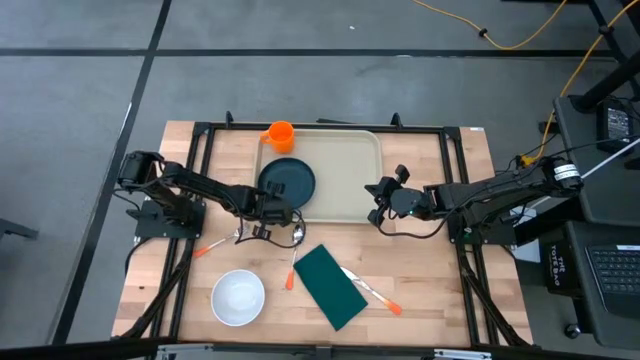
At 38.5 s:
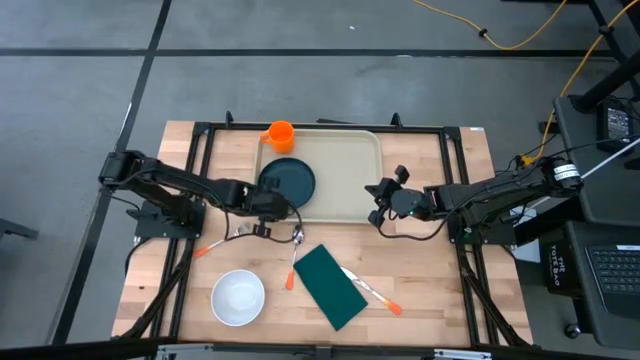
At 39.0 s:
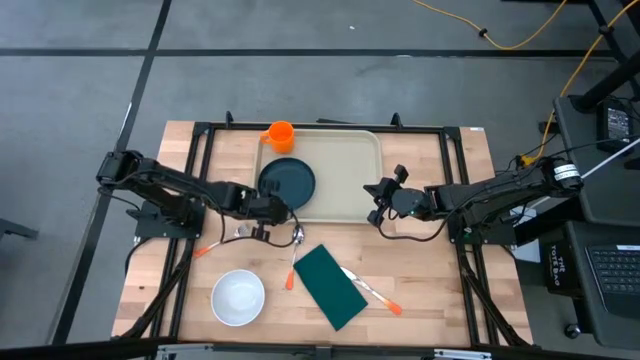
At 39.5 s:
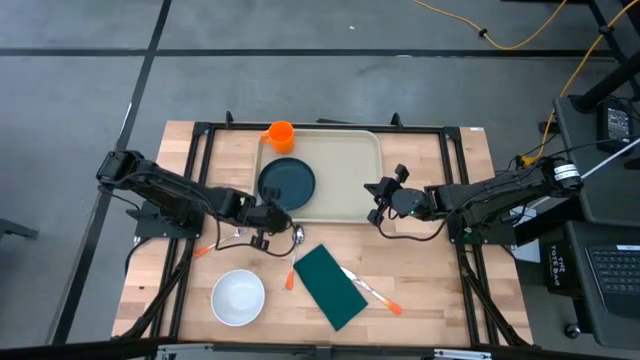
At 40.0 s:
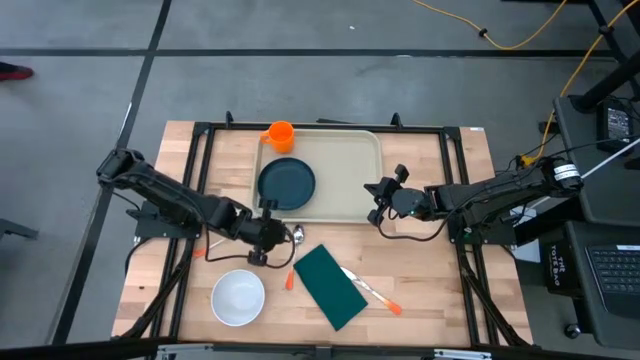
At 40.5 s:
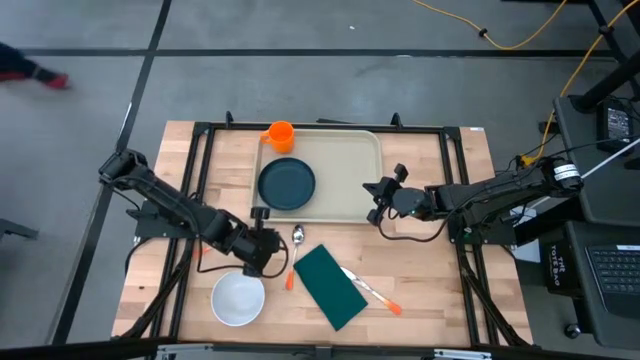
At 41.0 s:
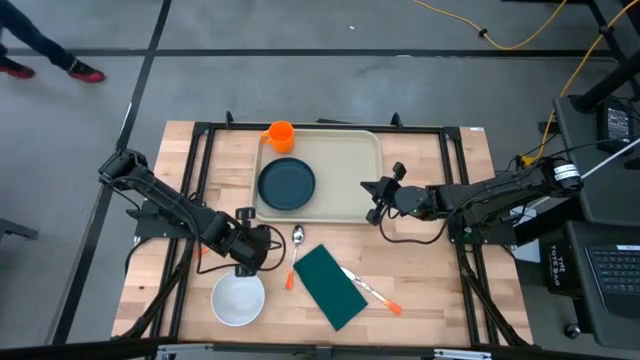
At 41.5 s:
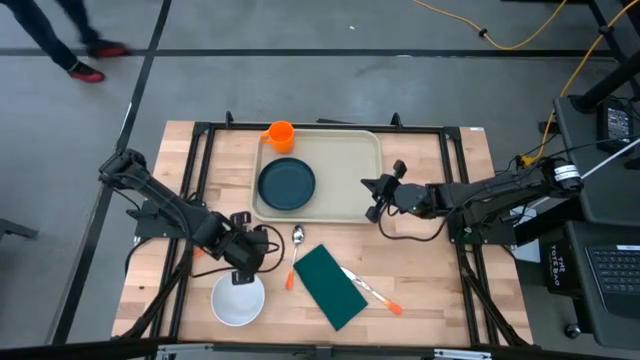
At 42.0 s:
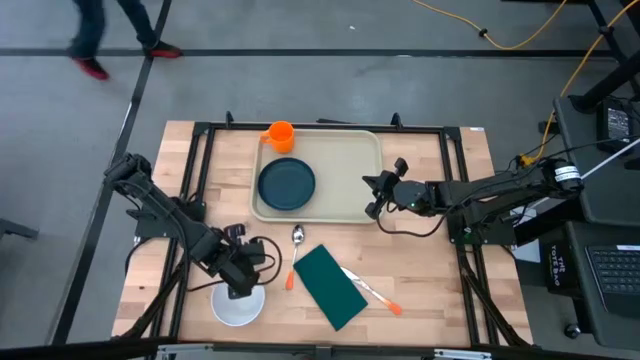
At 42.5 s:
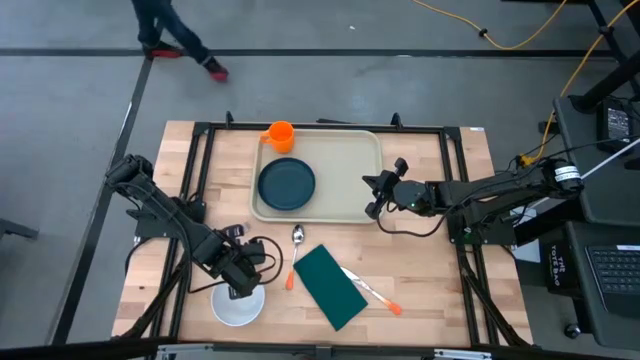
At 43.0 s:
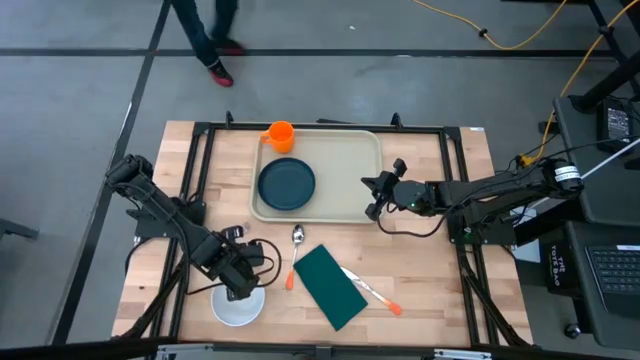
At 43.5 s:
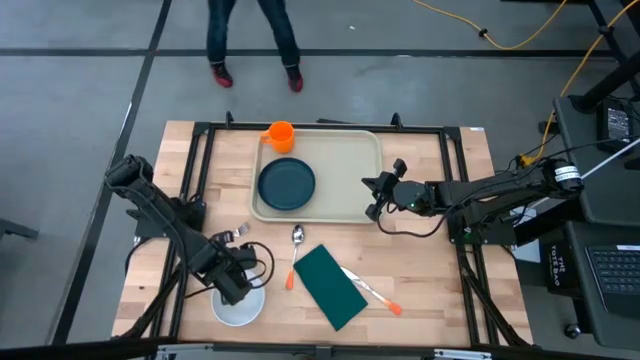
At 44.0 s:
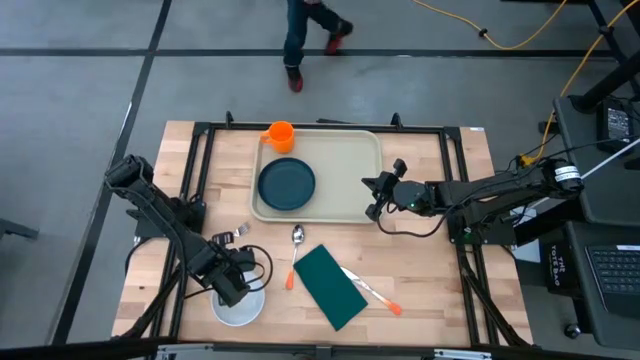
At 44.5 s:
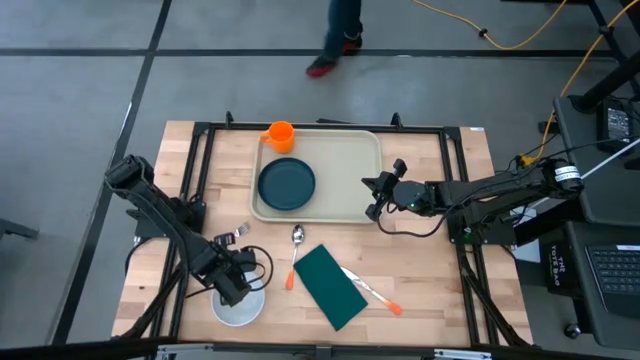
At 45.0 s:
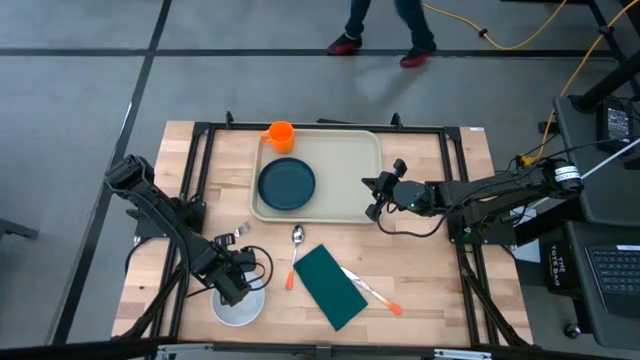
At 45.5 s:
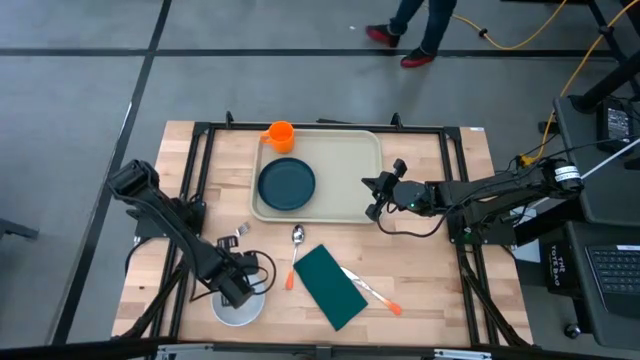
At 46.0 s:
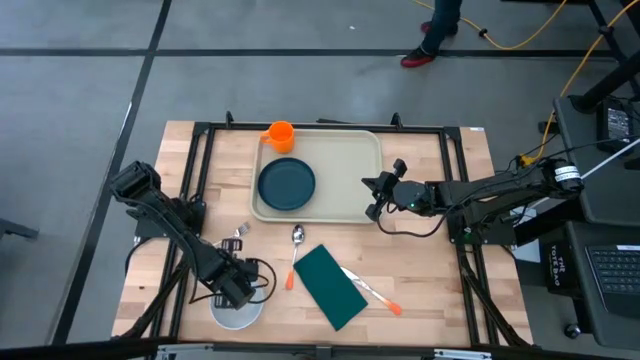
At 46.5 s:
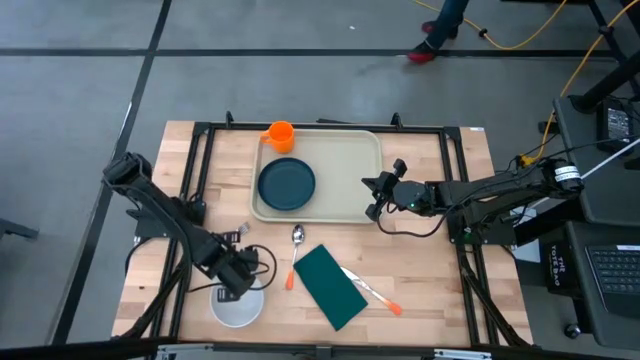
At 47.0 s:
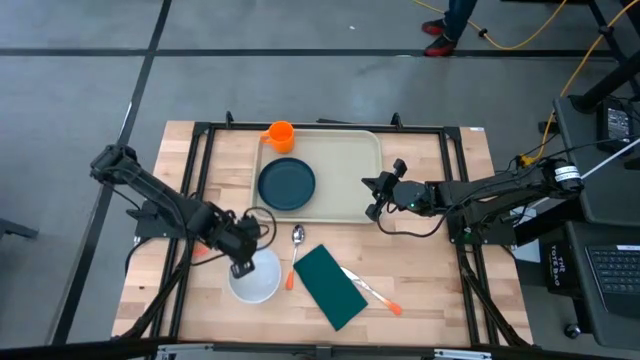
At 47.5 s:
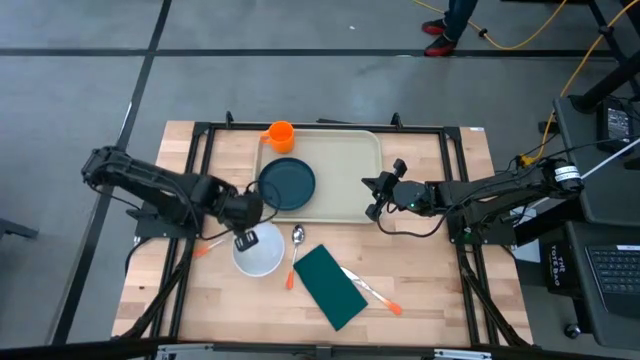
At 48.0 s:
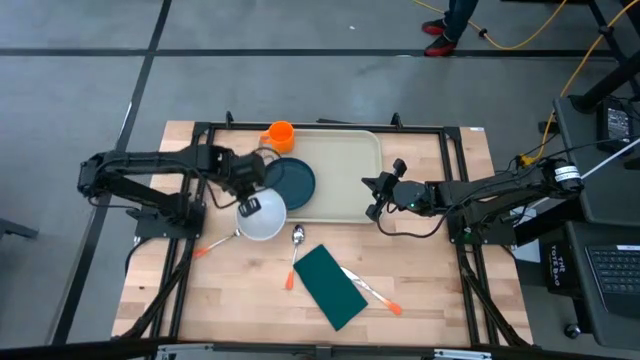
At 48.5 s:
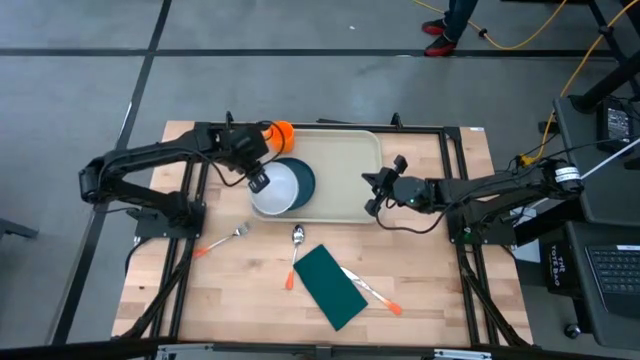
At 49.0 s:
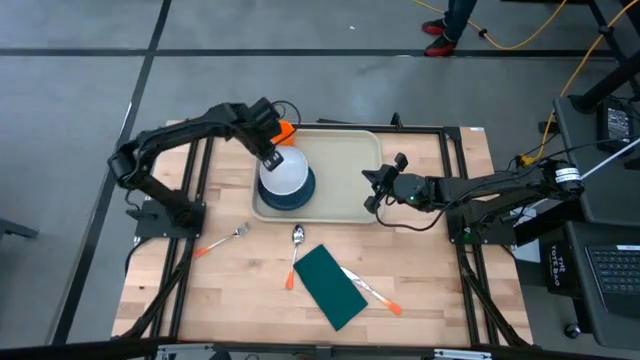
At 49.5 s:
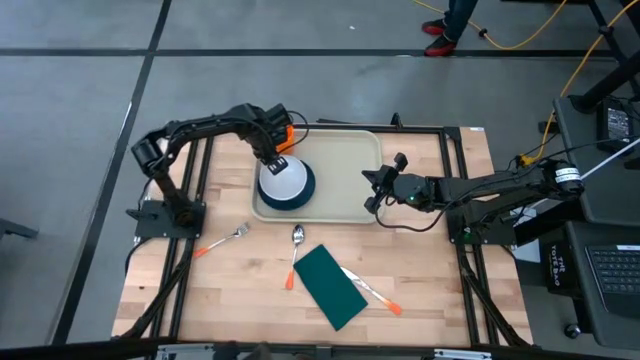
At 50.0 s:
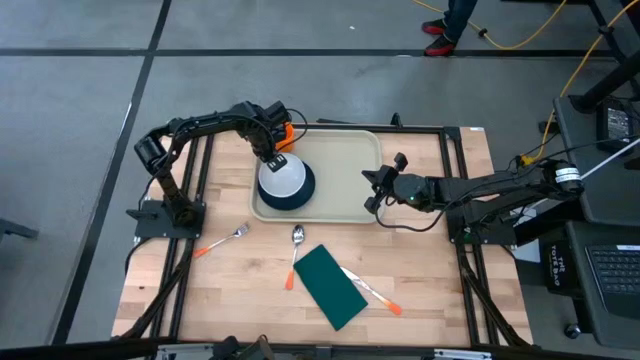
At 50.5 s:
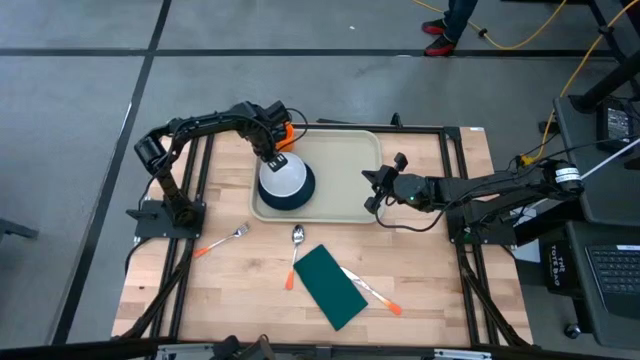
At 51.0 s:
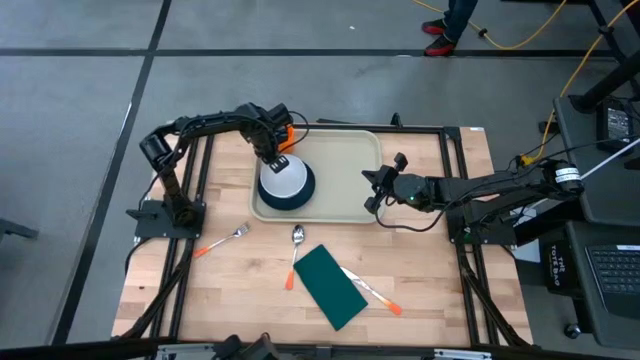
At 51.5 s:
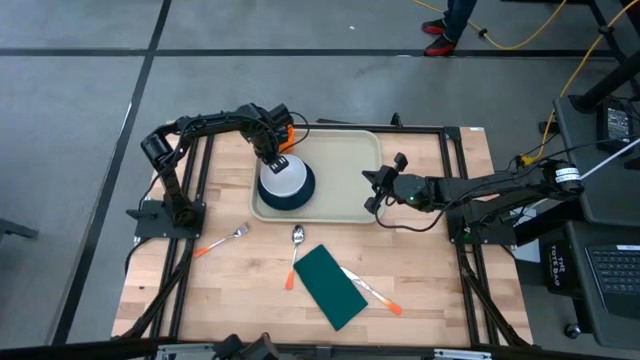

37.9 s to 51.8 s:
Task: Set up tray
Put the white bowl on top of the green plate on the brown serving tray

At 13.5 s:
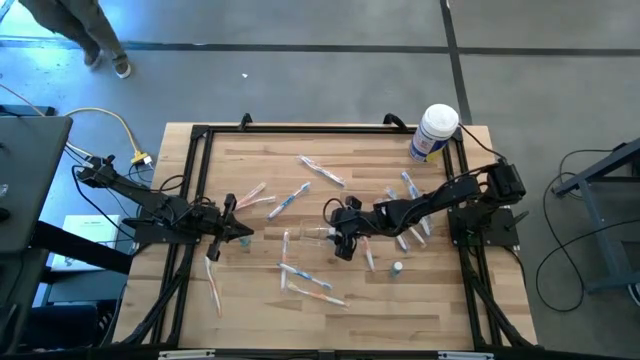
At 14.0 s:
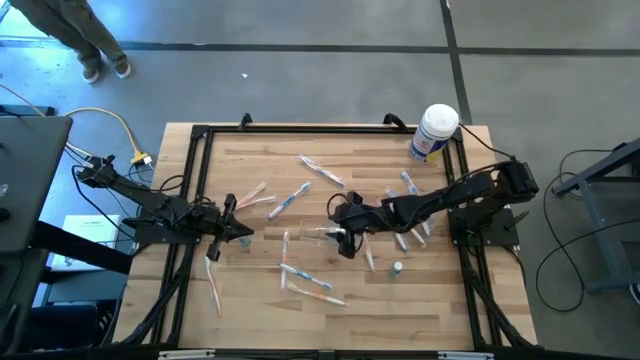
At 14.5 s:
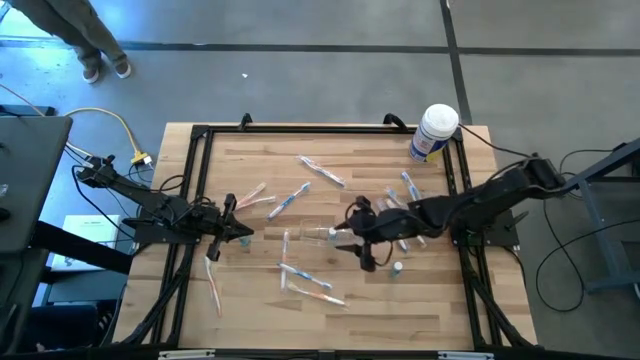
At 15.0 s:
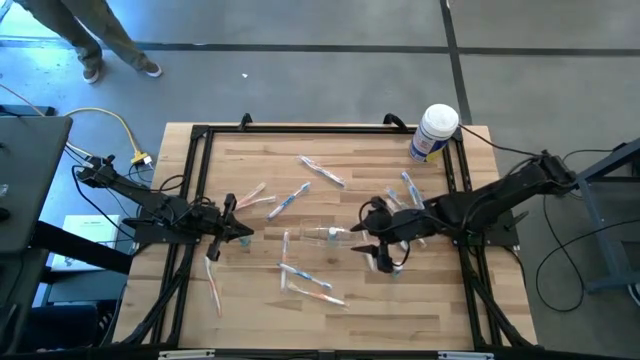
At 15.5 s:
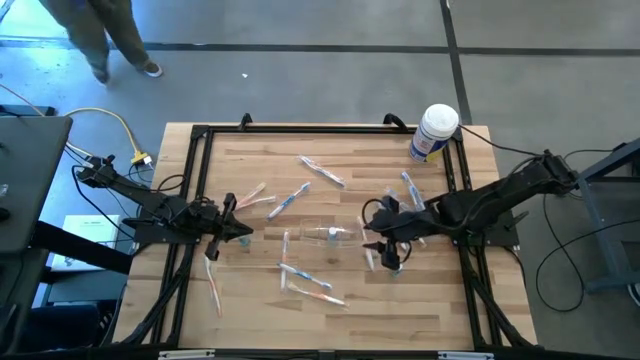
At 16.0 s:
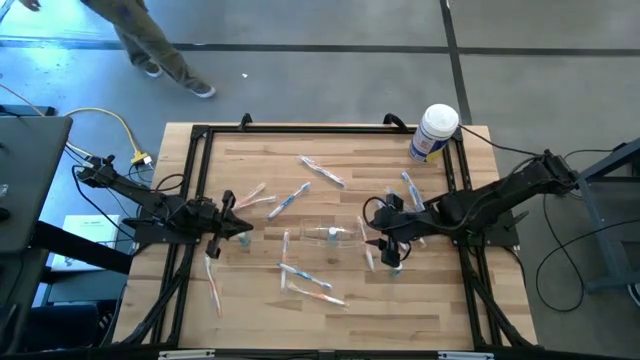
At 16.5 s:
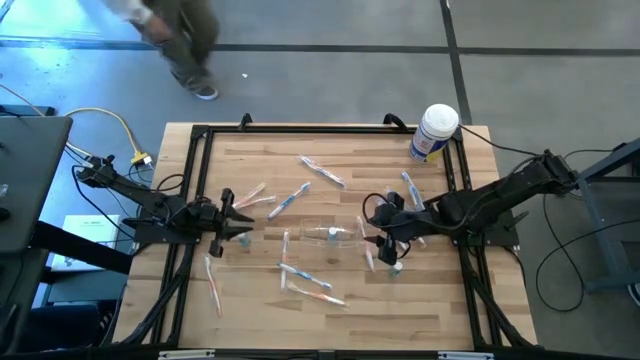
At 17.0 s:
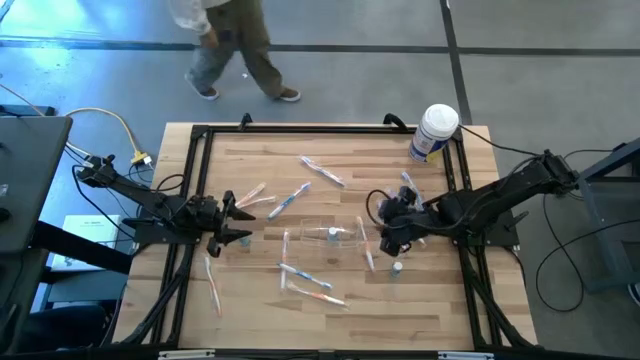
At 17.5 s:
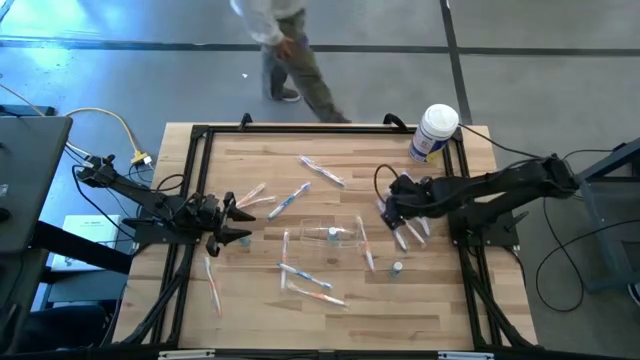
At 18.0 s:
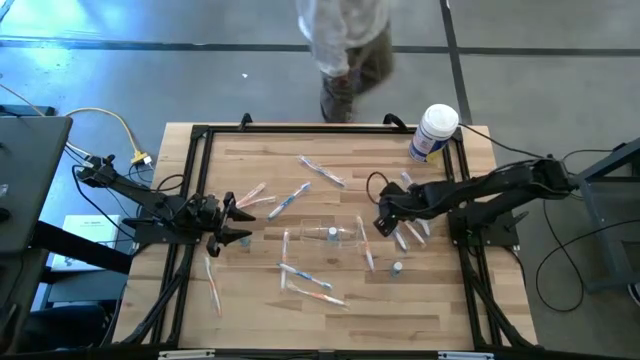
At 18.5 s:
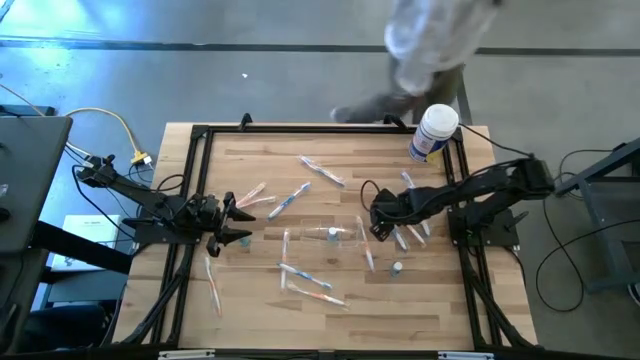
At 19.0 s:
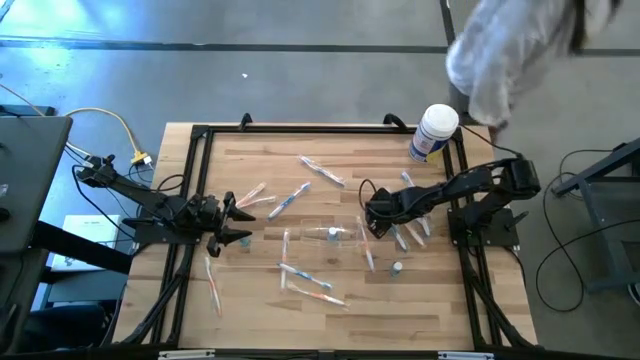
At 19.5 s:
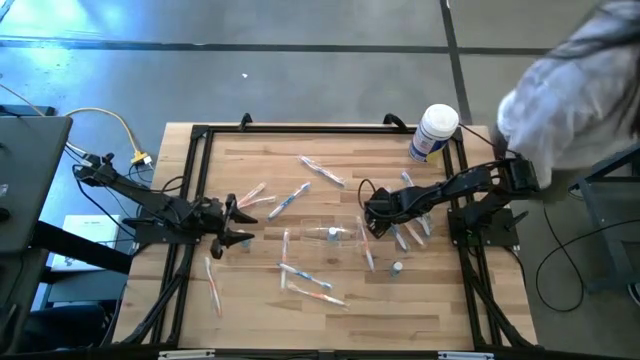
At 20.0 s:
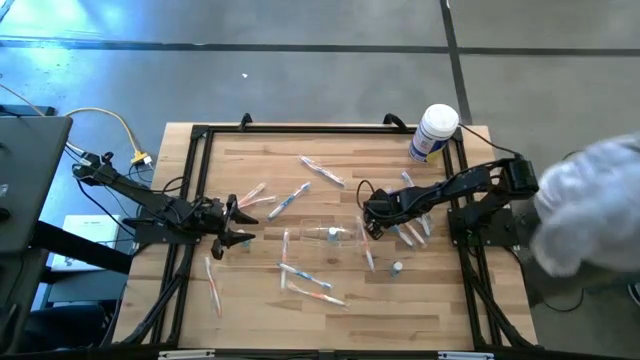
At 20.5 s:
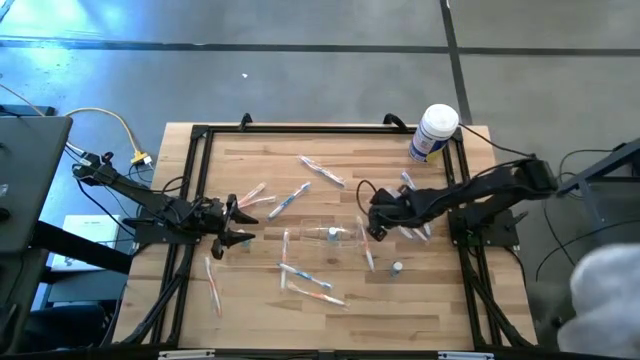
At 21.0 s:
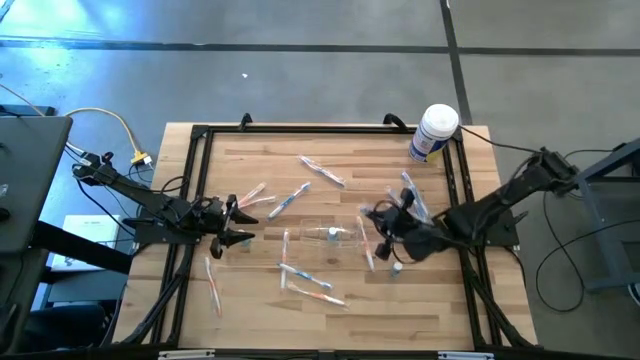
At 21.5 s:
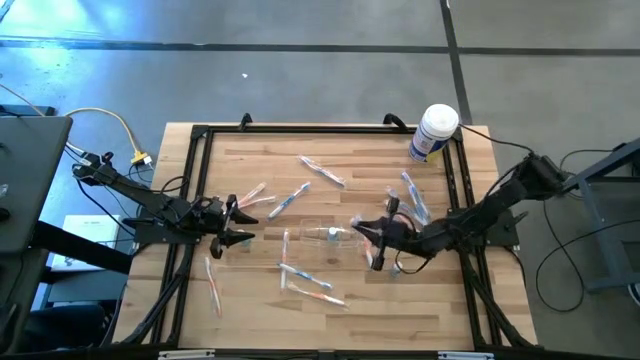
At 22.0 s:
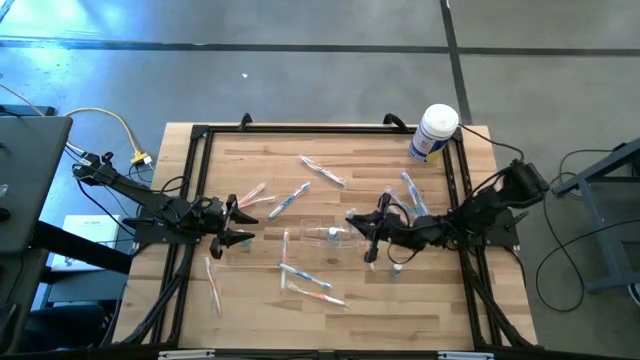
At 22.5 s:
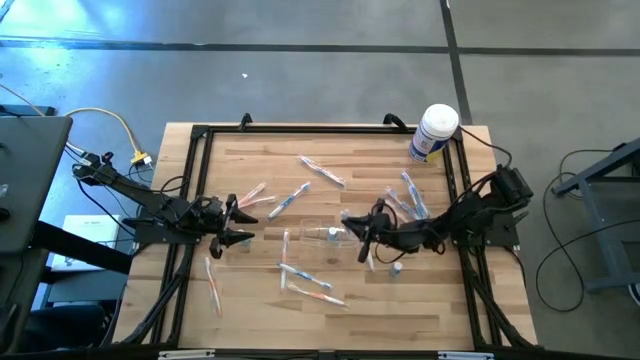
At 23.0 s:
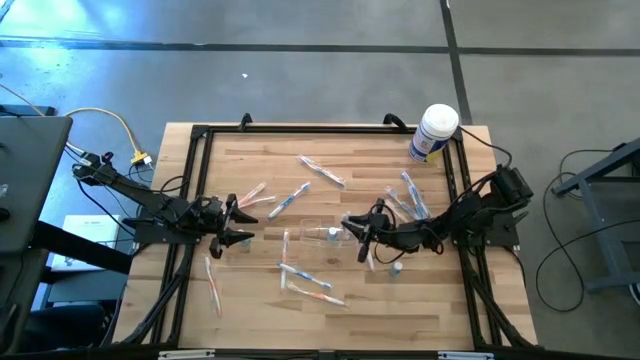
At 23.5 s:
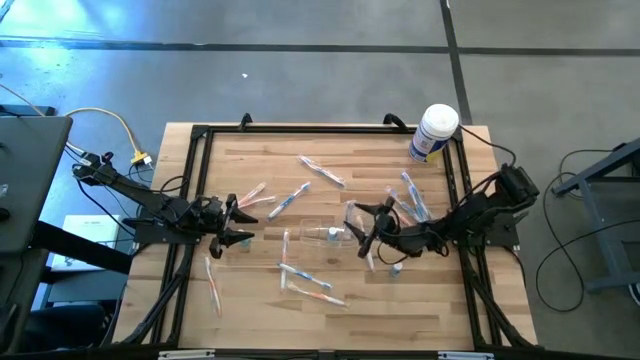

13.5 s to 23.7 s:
Task: Pick & Place toothbrushing station
Put the blue toothbrush into the transparent organizer
